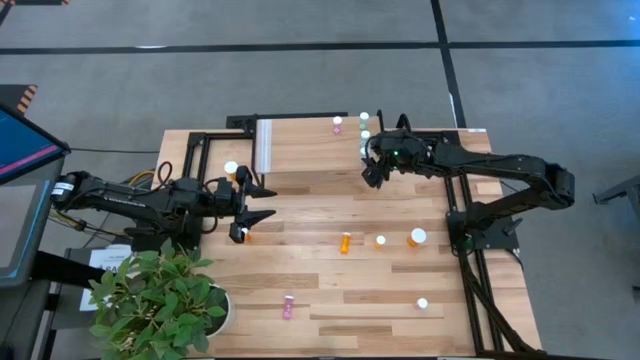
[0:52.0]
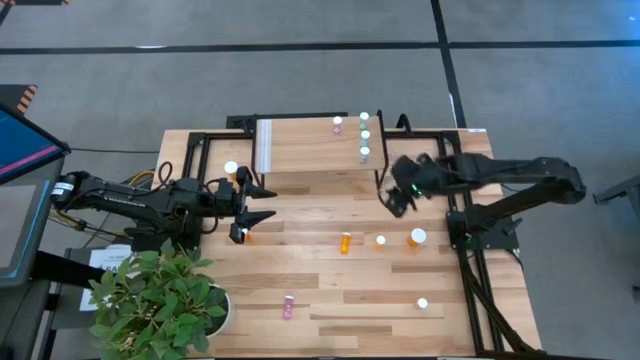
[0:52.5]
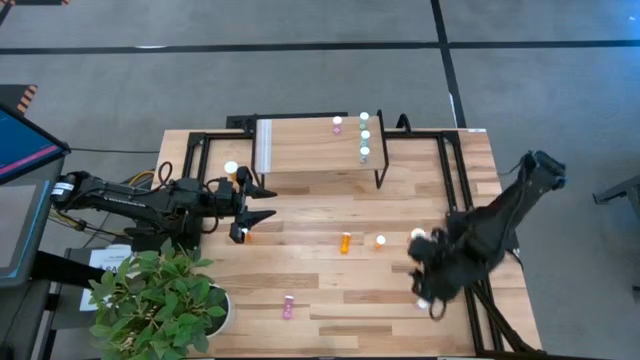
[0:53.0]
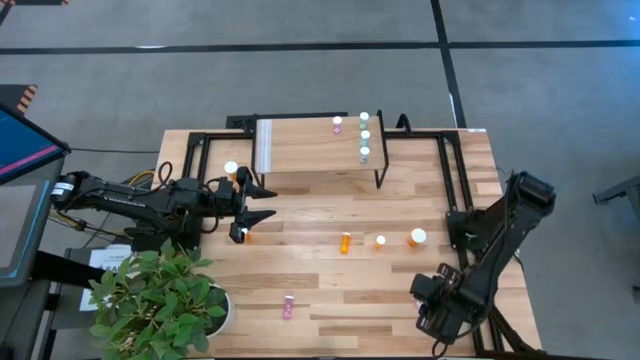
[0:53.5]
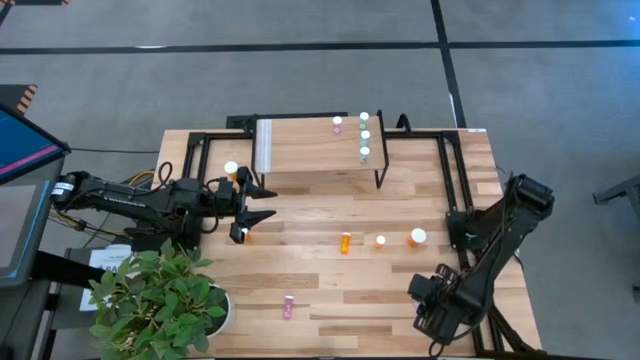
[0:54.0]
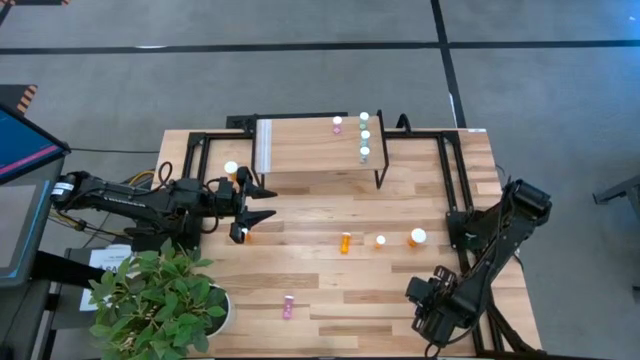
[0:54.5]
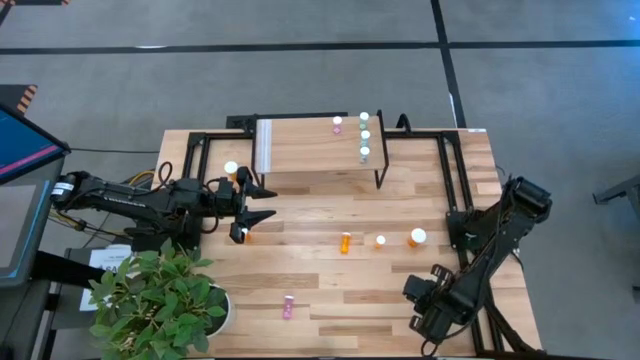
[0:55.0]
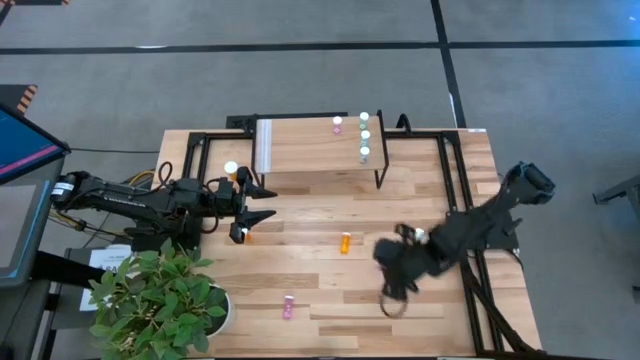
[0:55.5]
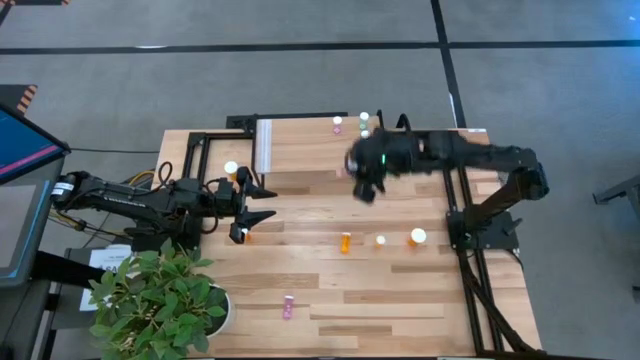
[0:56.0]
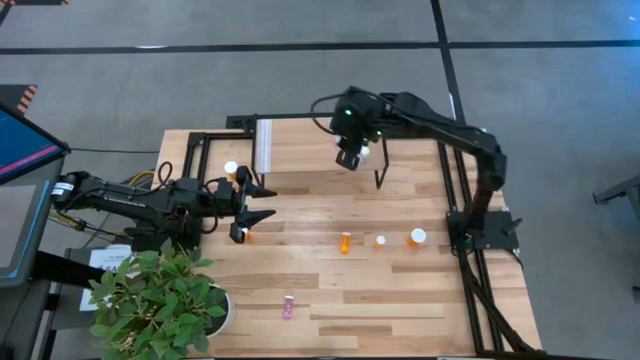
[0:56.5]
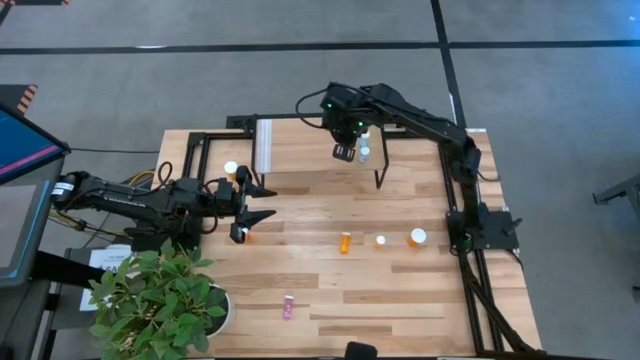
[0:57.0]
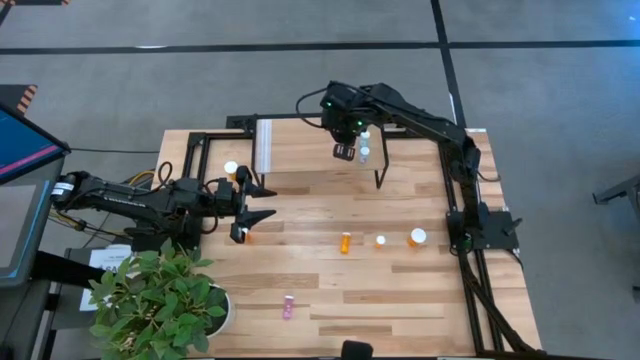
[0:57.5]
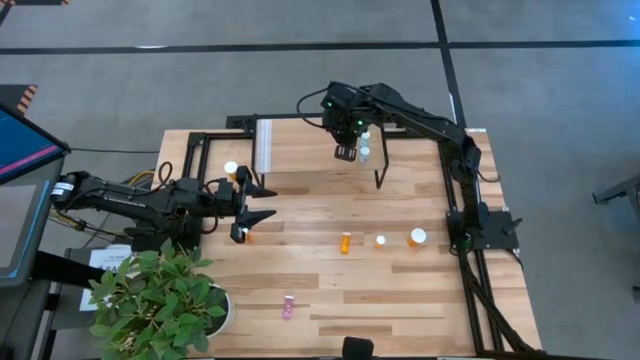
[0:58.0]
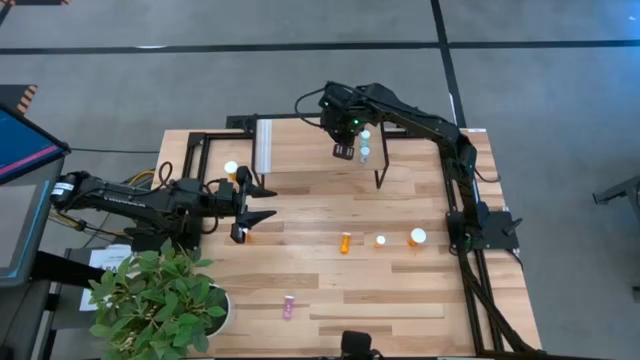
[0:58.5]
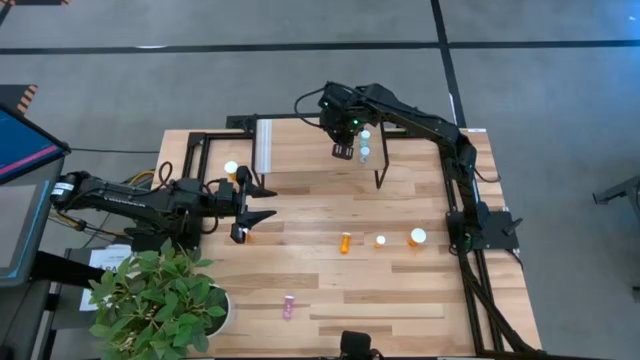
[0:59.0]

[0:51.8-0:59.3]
Task: Pick and place medicine bottles onto shelf by color
Align the right small pink pill bottle with the other small pink pill bottle on the shelf

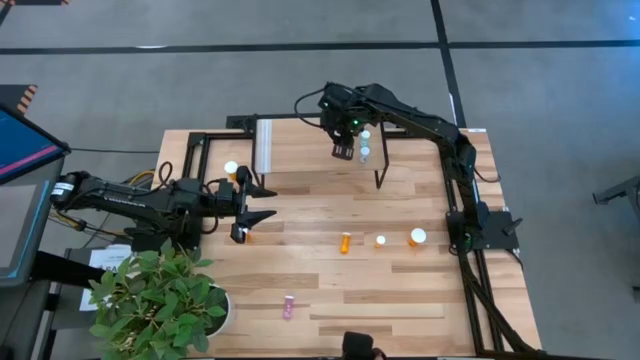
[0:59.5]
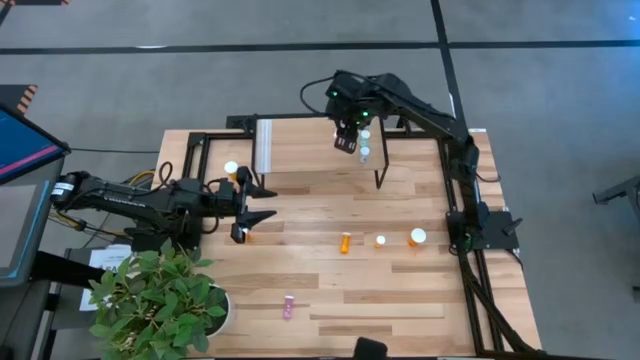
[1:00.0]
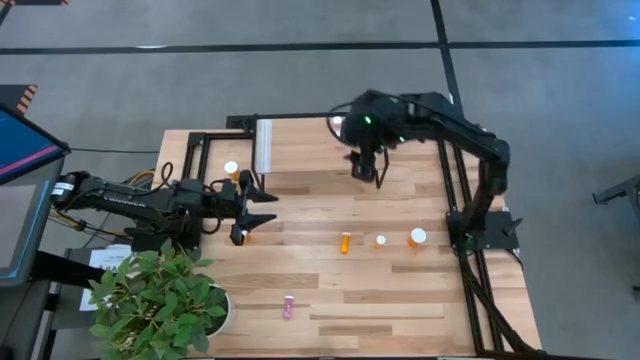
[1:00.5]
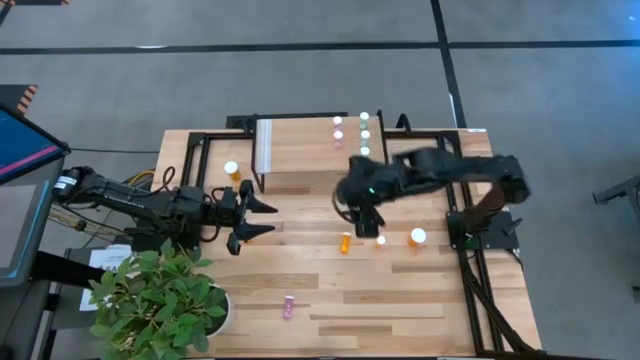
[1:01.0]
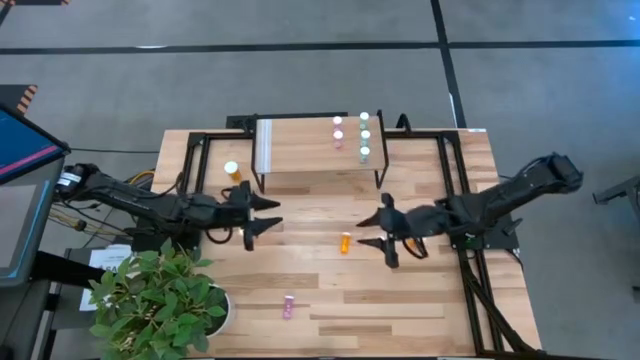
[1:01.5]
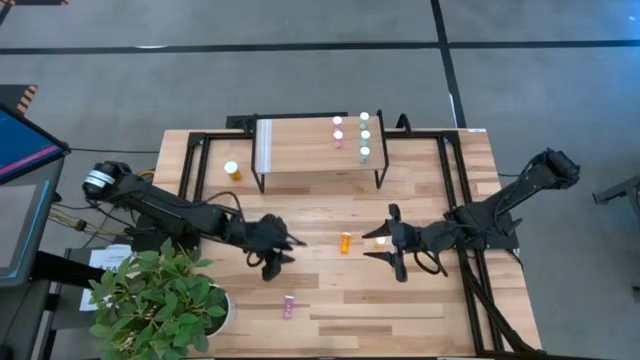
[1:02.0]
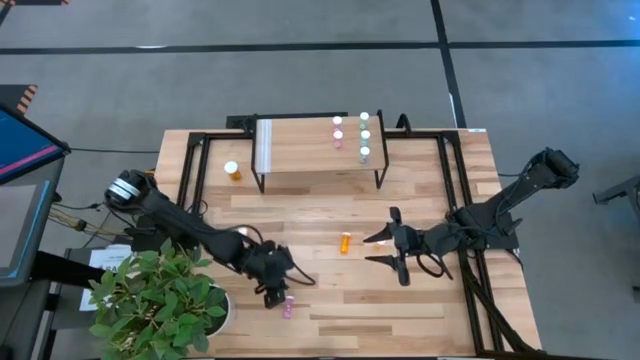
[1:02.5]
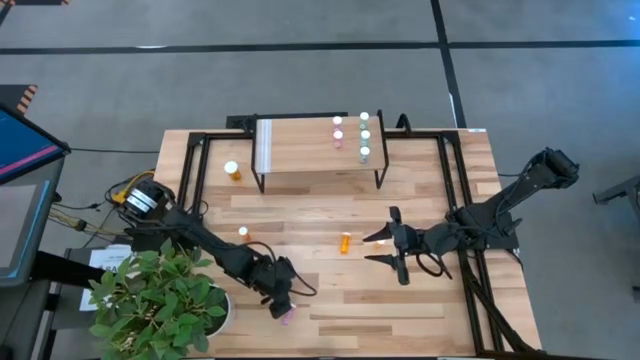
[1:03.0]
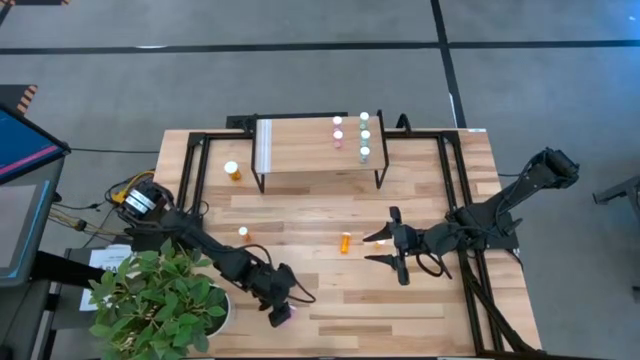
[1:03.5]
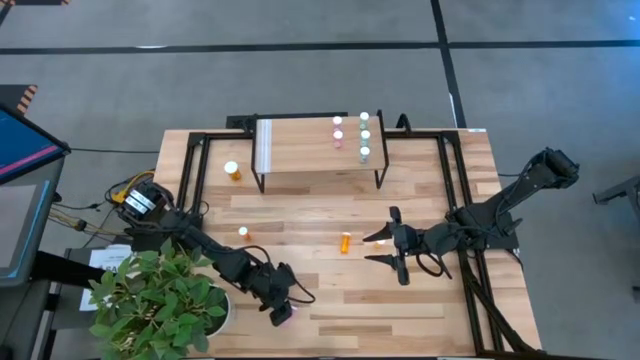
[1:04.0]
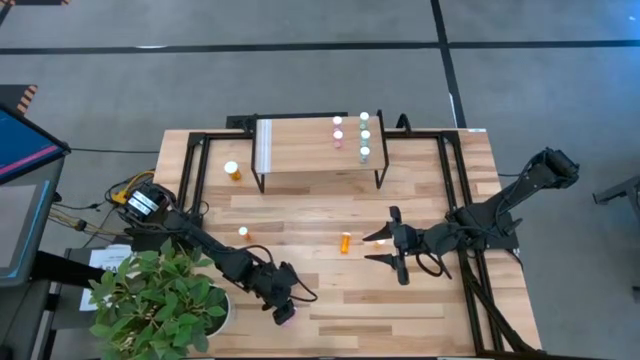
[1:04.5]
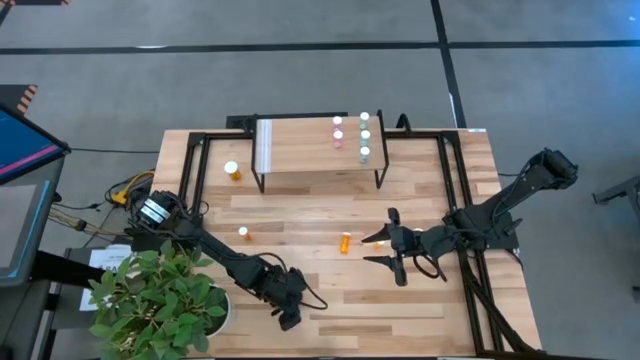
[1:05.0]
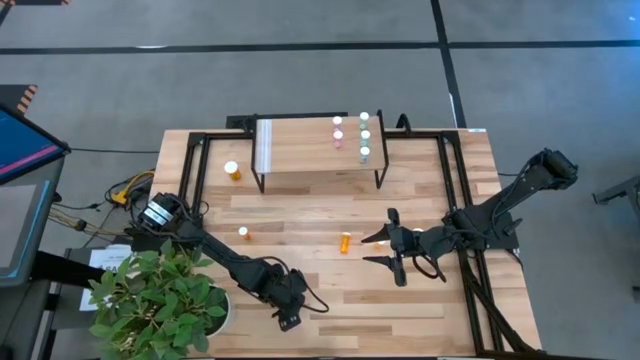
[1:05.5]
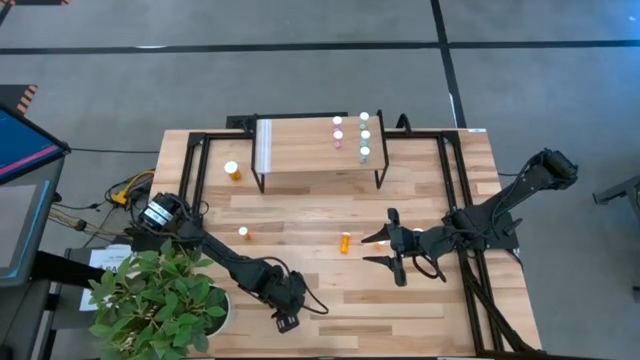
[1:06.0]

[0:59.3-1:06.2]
Align the small pink pill bottle with the other small pink pill bottles on the shelf

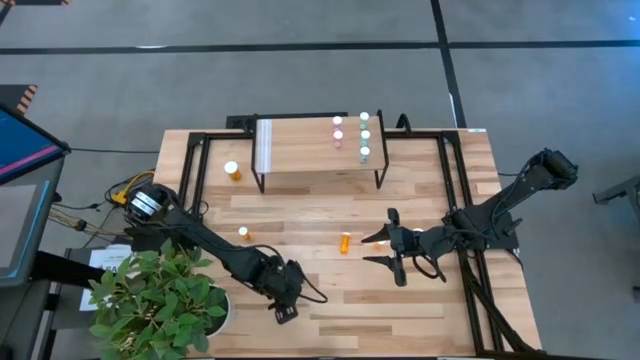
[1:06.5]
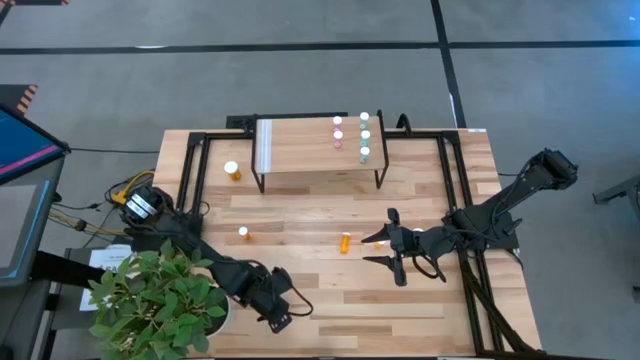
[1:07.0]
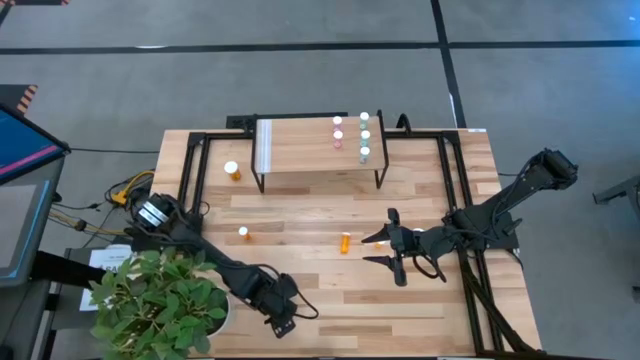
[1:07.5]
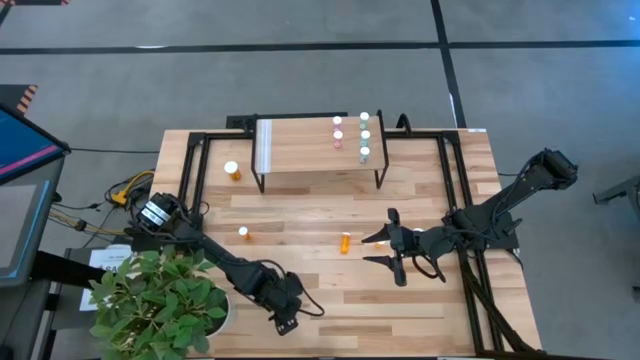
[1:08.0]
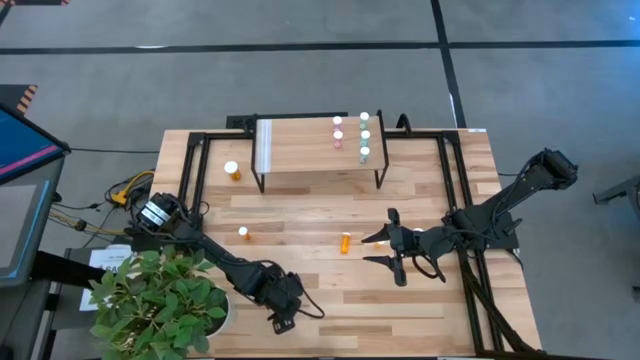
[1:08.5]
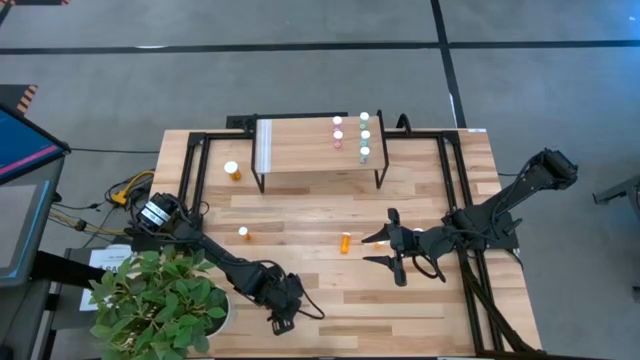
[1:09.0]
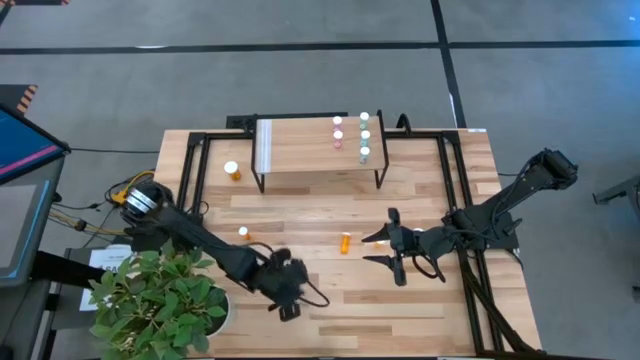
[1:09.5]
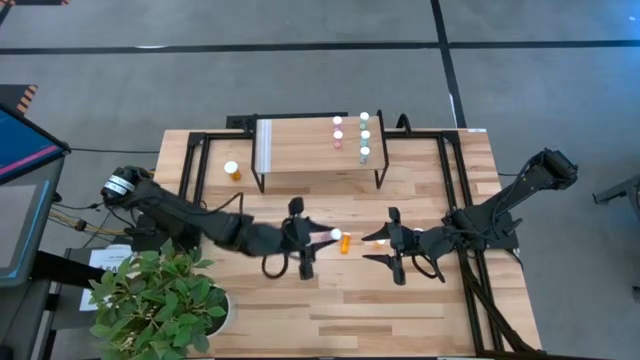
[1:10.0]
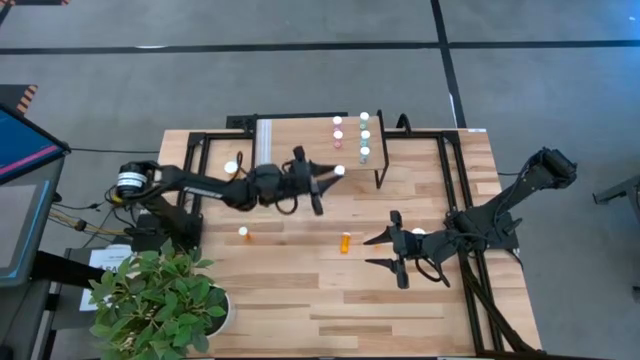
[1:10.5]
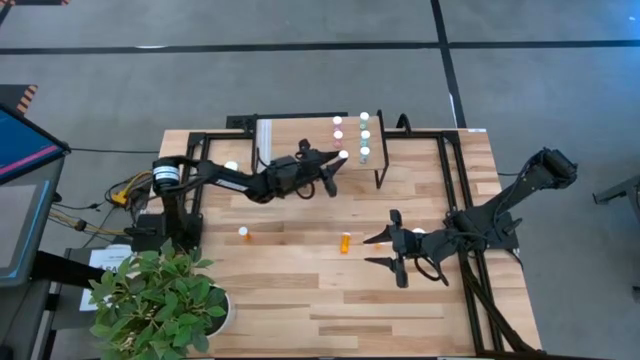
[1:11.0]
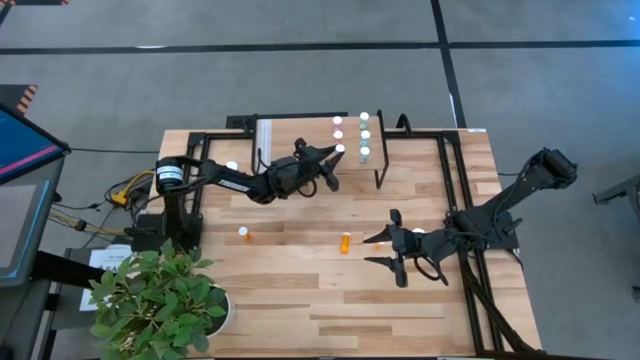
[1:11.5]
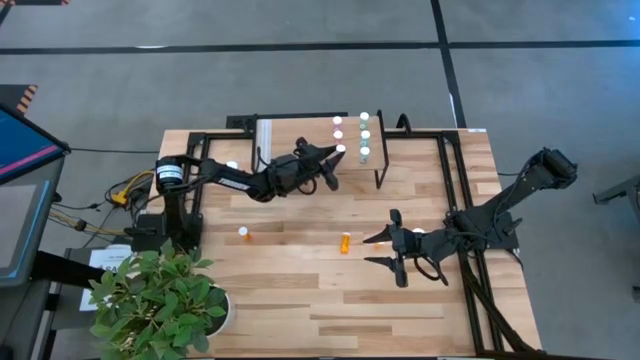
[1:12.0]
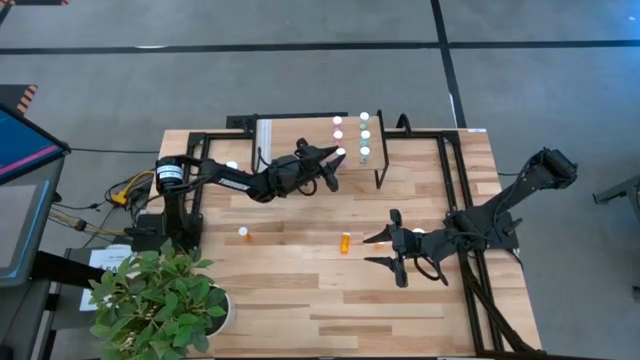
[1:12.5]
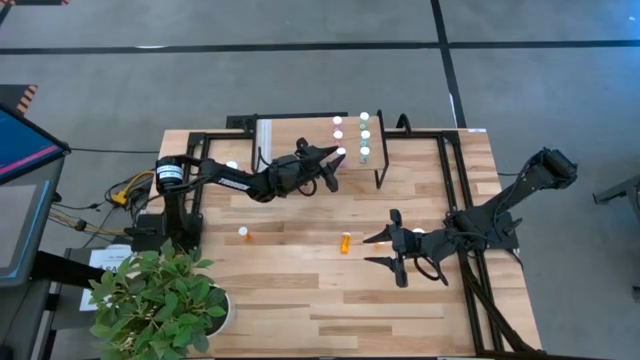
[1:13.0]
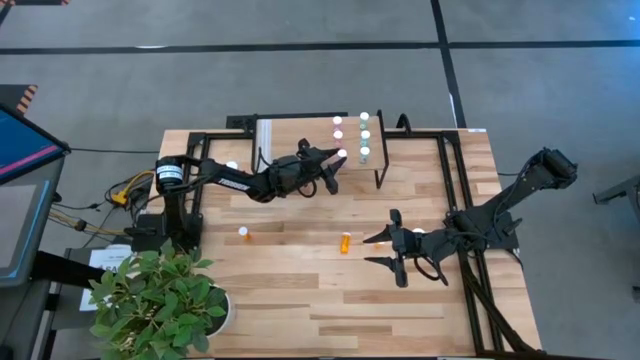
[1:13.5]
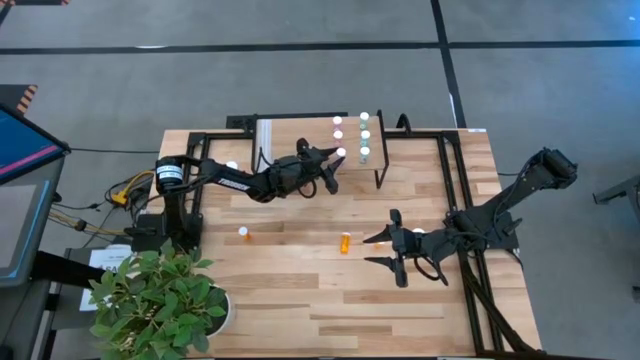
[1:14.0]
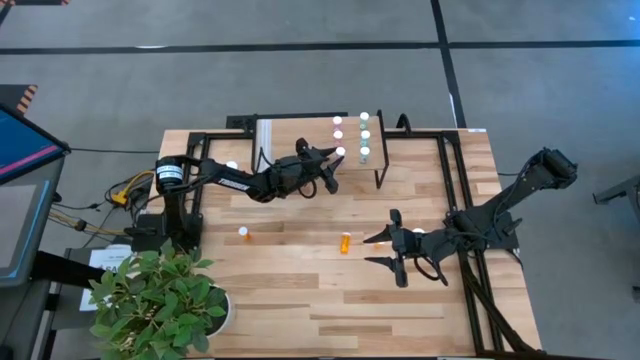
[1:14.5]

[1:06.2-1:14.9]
Align the small pink pill bottle with the other small pink pill bottles on the shelf
